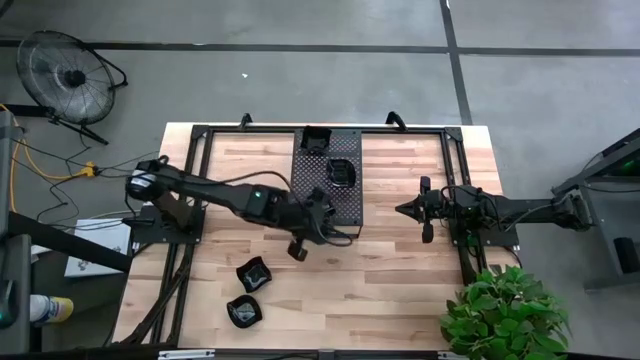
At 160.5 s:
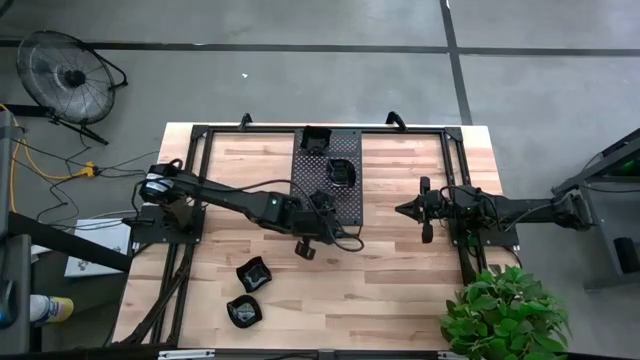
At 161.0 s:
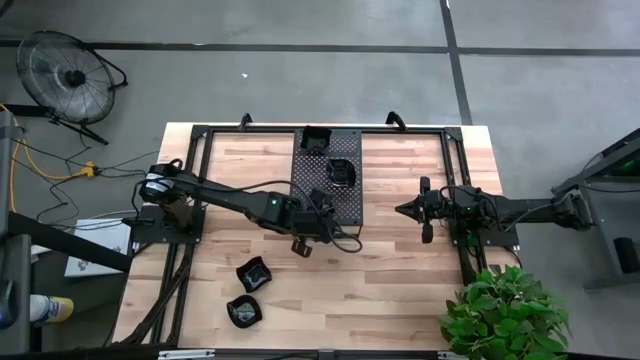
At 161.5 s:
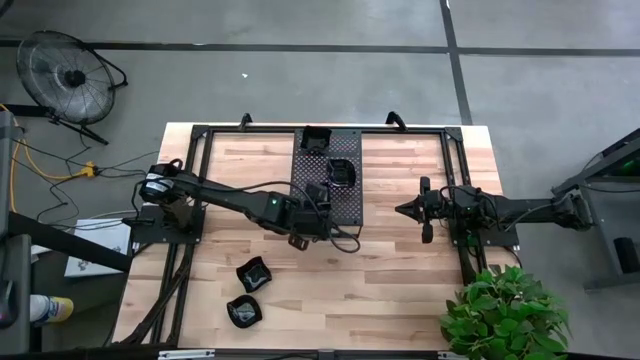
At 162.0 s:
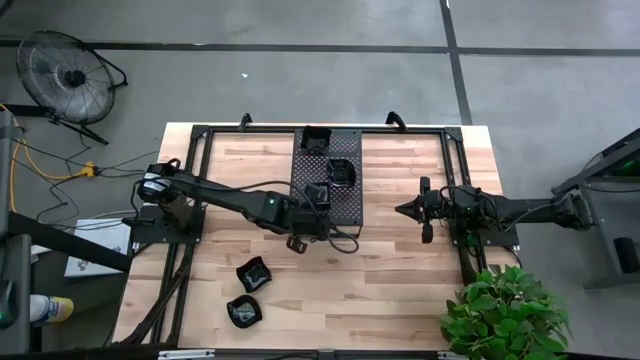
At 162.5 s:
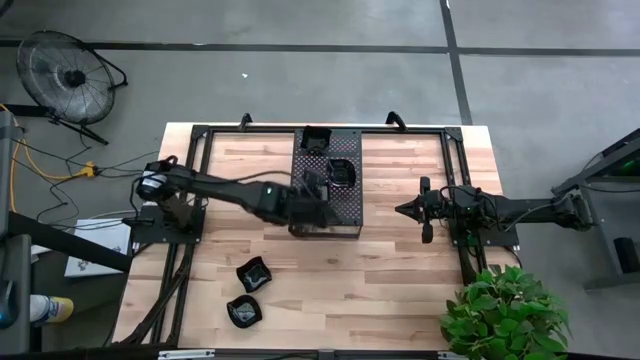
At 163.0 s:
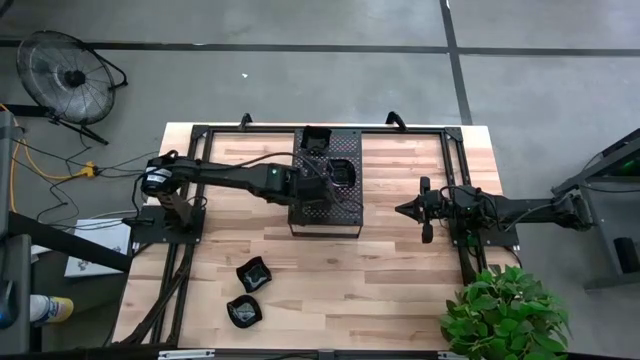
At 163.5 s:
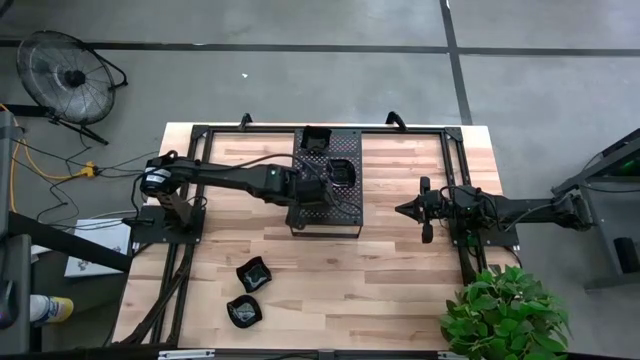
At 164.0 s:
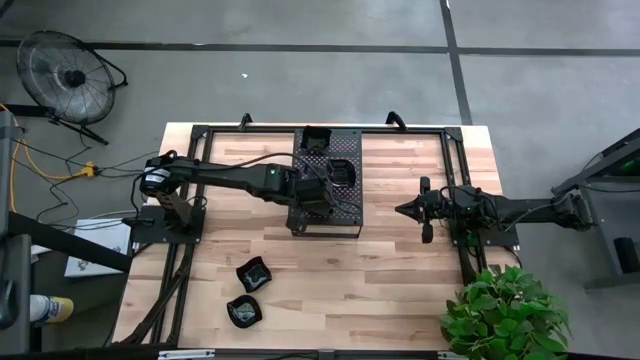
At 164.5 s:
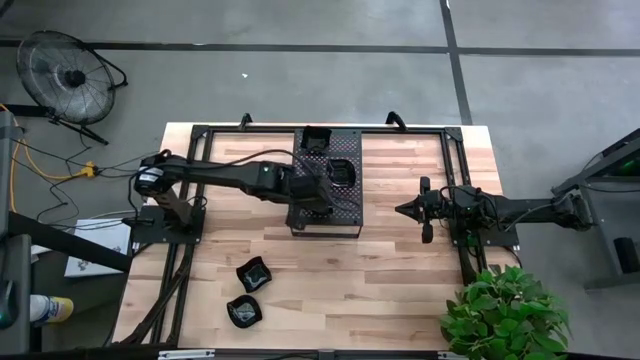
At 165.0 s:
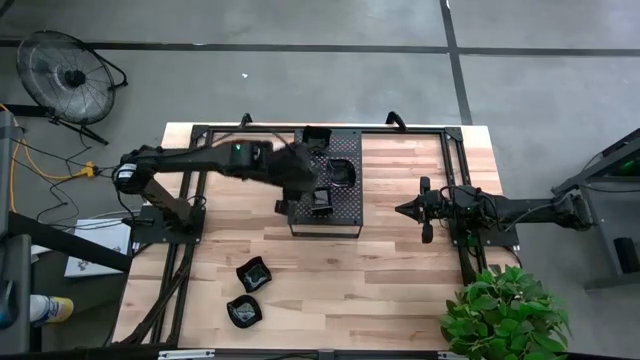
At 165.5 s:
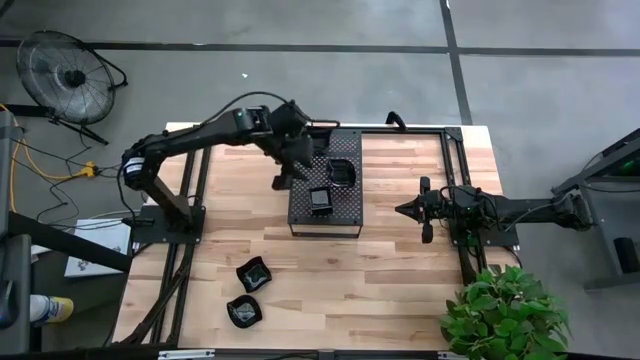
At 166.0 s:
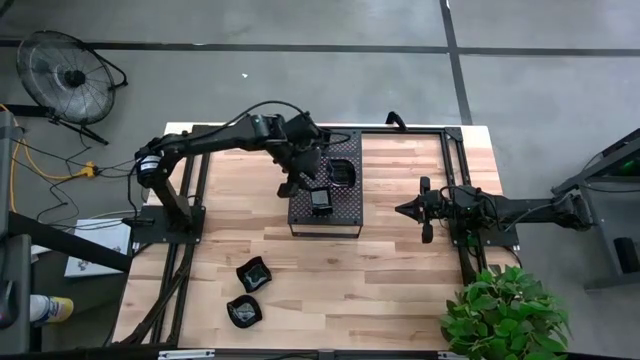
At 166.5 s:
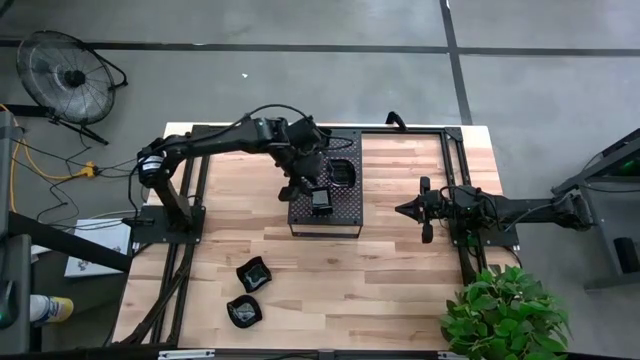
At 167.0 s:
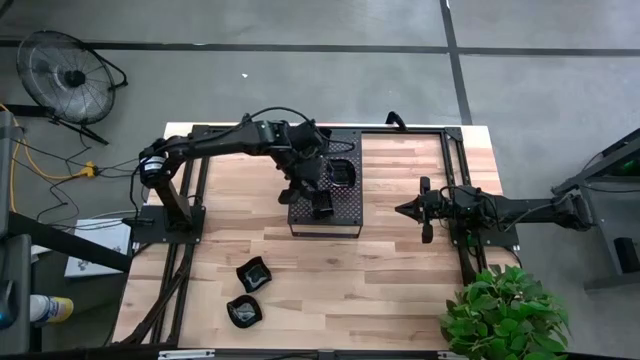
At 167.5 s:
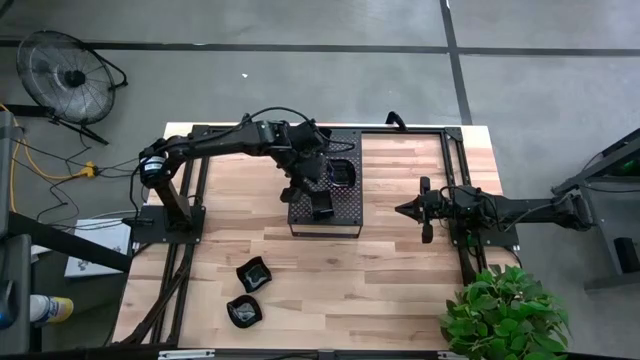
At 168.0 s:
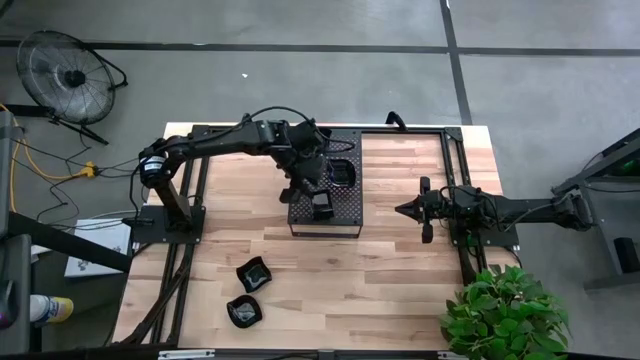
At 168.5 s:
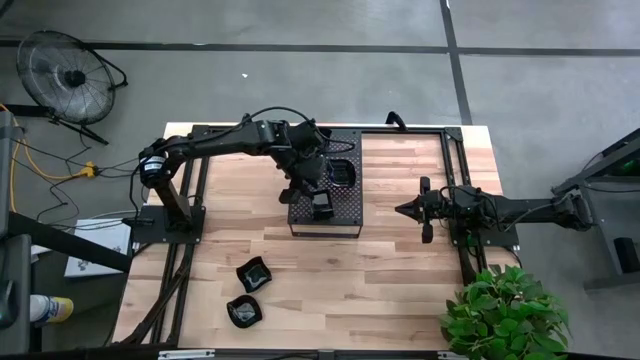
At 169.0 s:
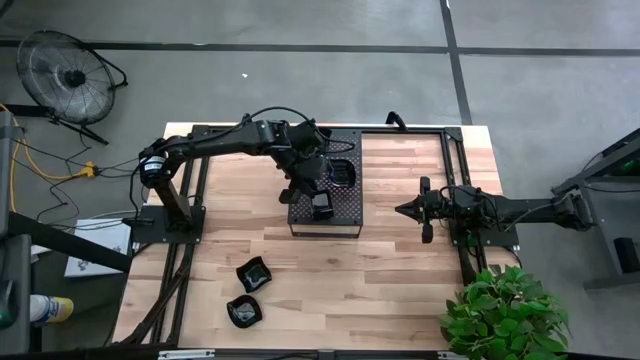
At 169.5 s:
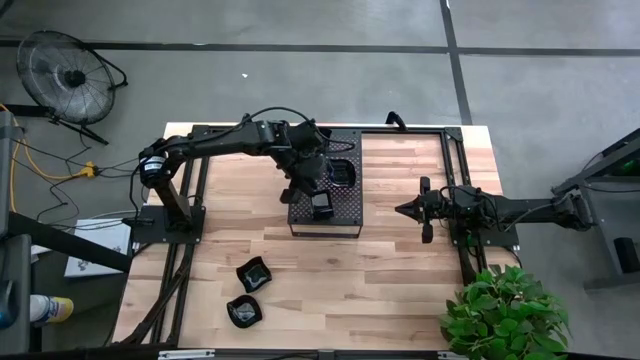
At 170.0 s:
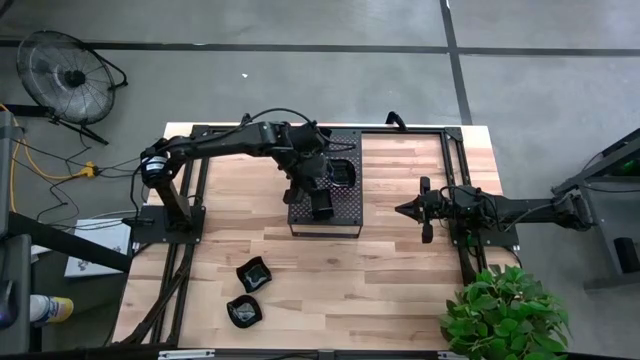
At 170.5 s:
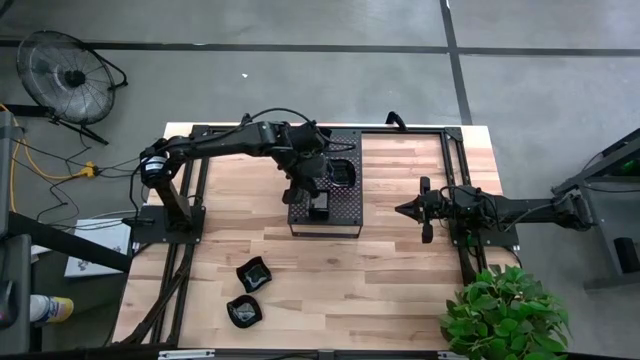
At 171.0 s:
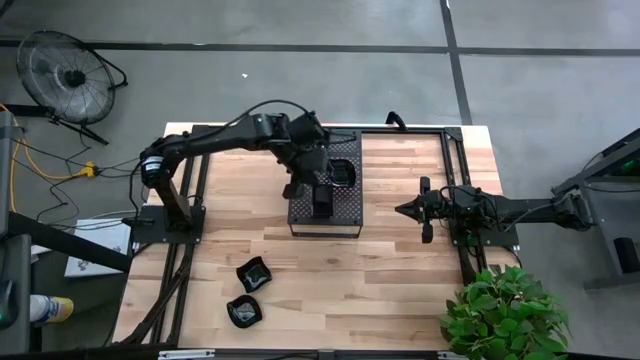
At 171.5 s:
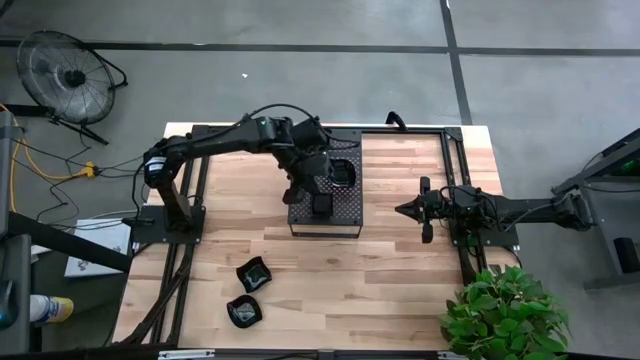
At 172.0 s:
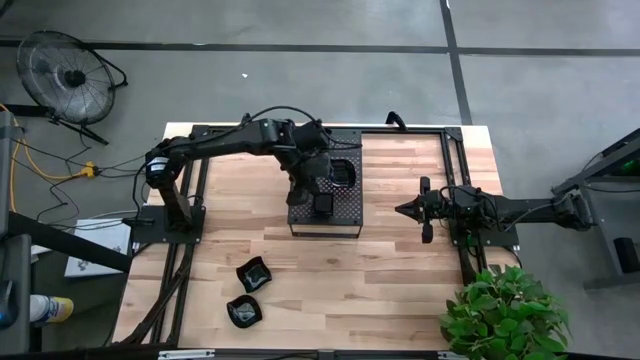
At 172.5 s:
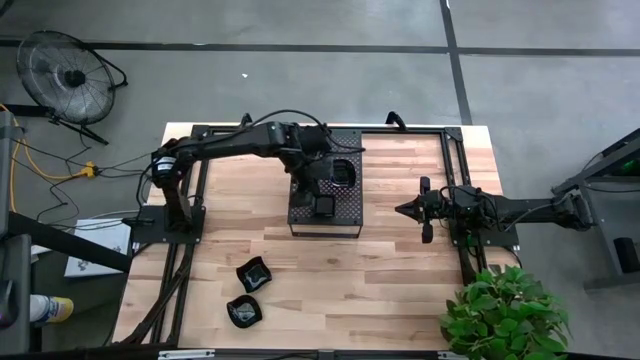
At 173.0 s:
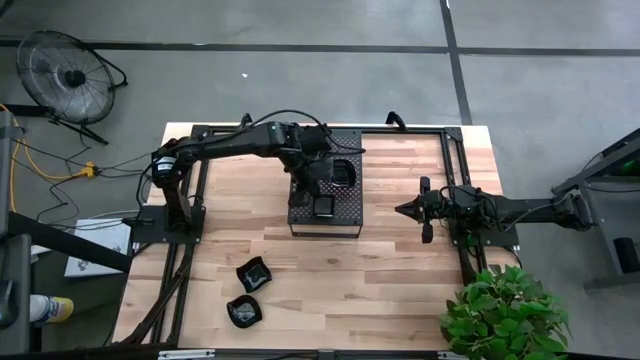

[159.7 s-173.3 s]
Task: Pick & Place Mini shaped plates
Stack the black square shape plate on top of the other black square shape plate on the shelf

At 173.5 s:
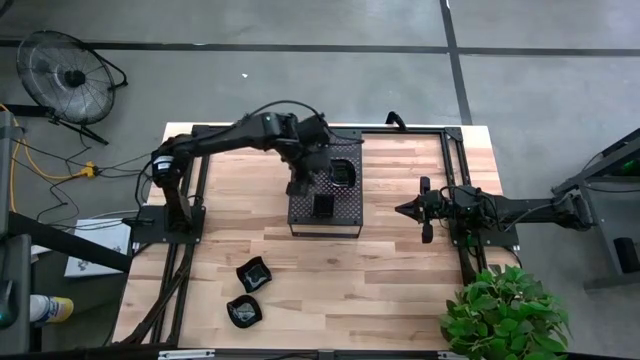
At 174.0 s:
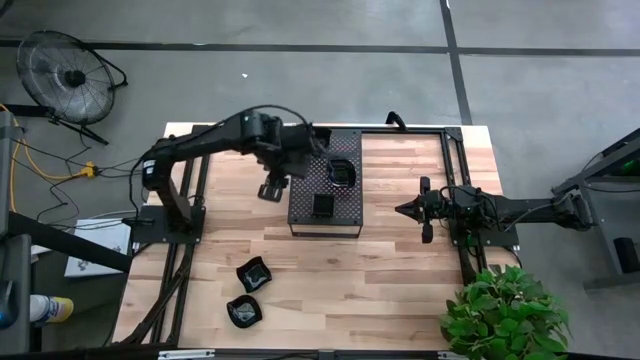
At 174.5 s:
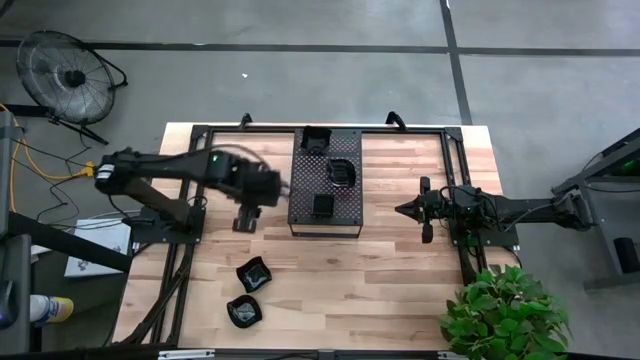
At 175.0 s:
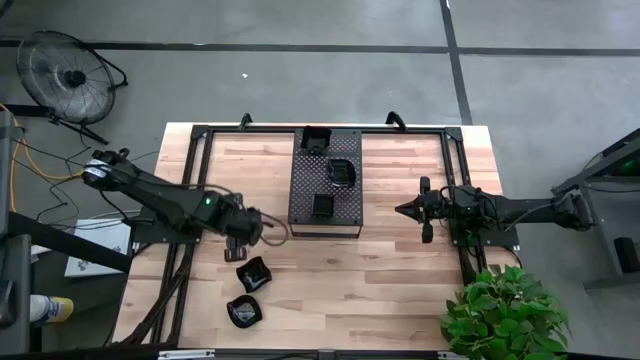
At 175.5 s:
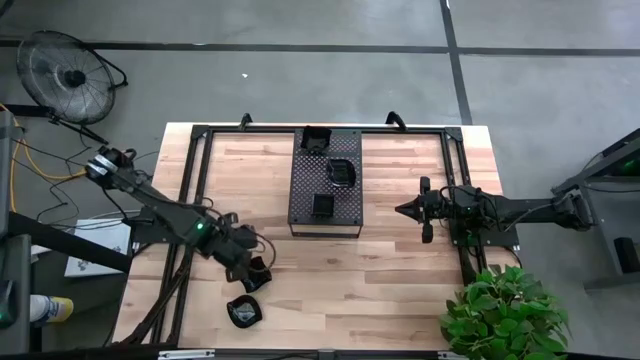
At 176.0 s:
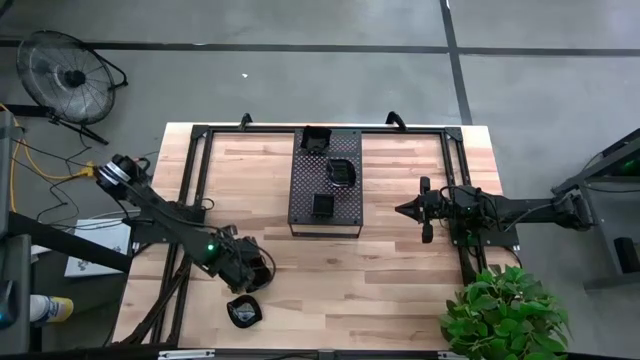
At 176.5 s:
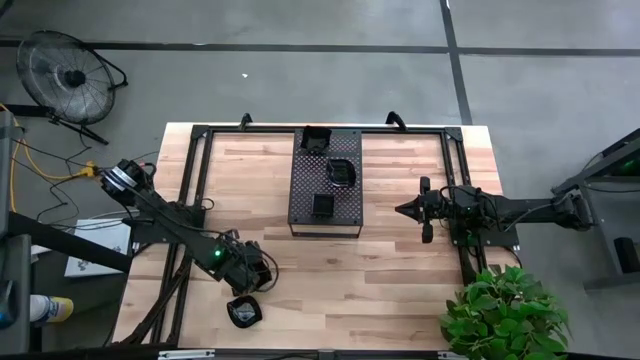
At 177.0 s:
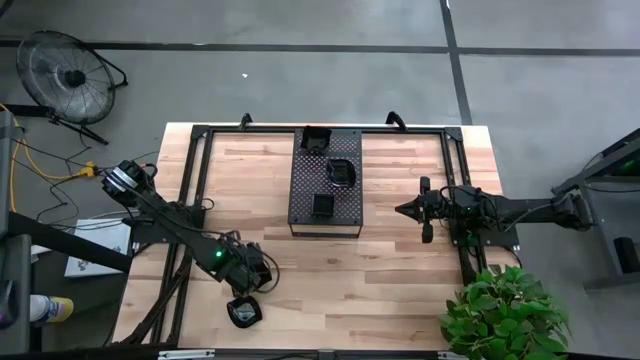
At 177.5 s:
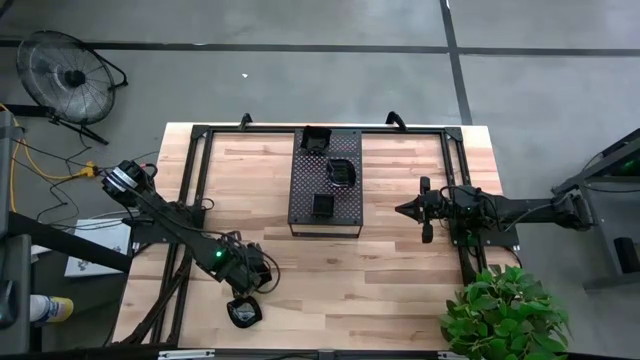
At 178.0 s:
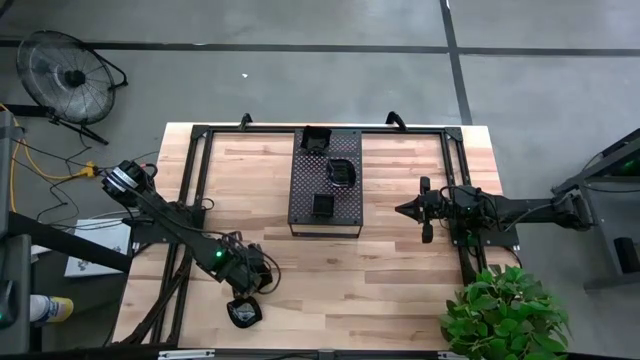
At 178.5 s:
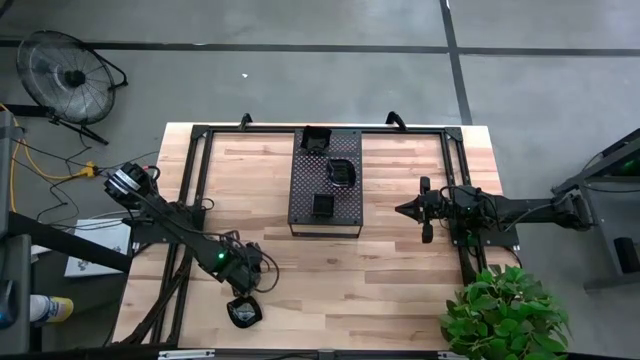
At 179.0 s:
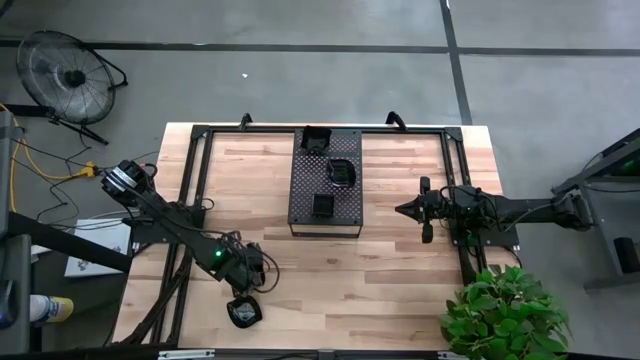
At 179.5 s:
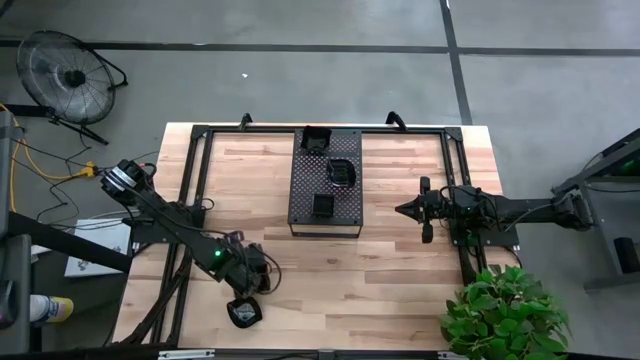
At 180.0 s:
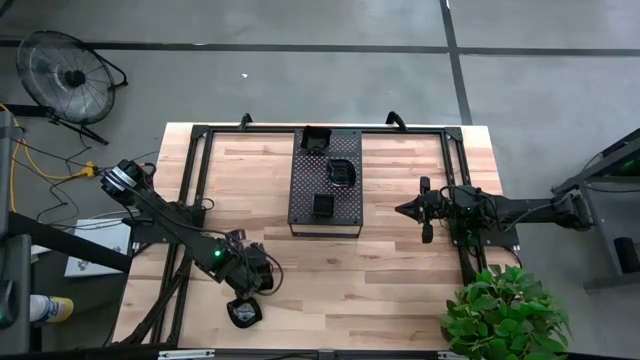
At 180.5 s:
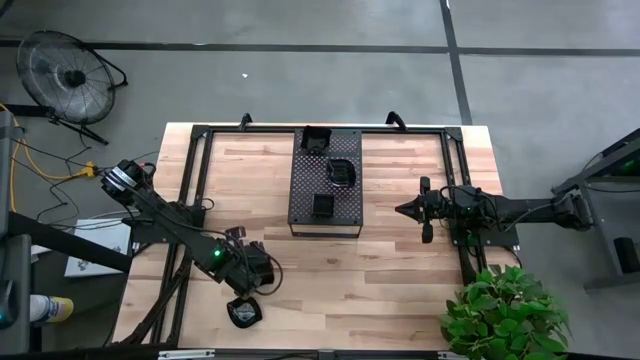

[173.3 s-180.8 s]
Stack the black distorted square plate on top of the other black distorted square plate on the shelf

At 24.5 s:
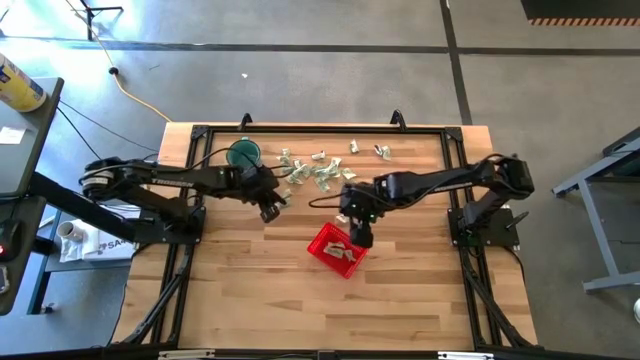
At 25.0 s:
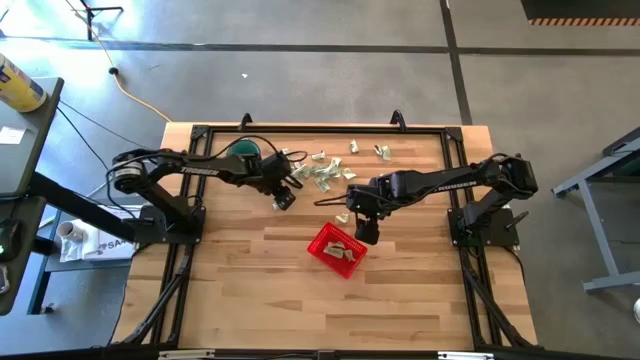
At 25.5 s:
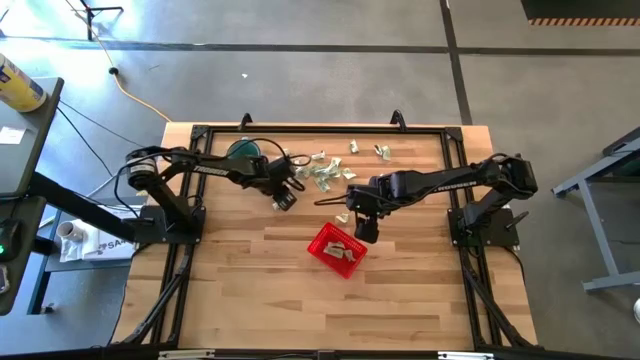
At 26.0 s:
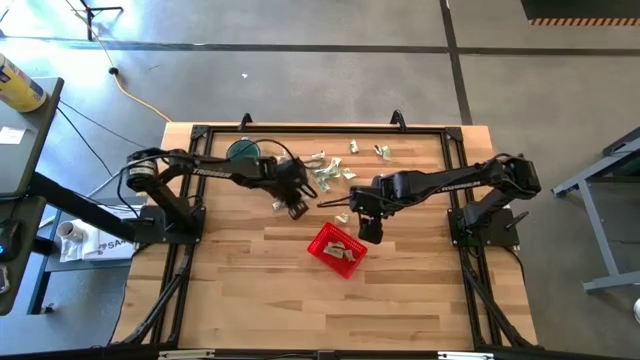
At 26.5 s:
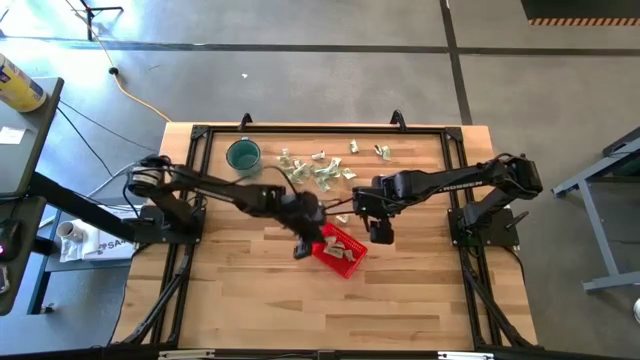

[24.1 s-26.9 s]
Task: Pick and place Stevia / Truvia into bins
Put the light green stevia packet into the bin
